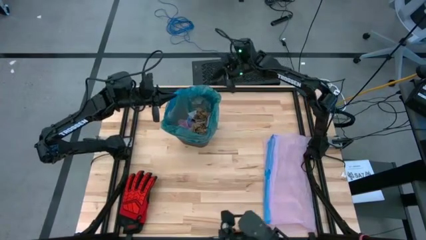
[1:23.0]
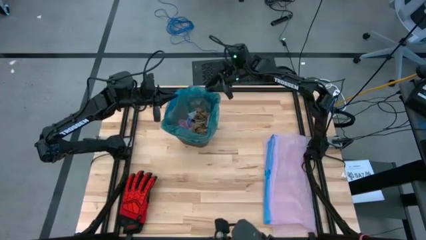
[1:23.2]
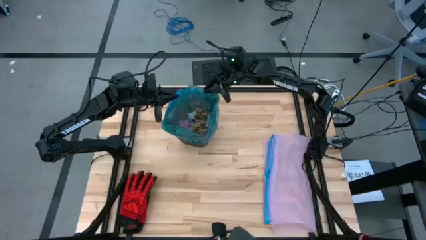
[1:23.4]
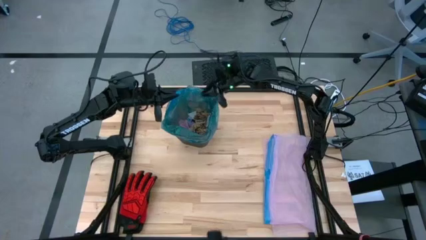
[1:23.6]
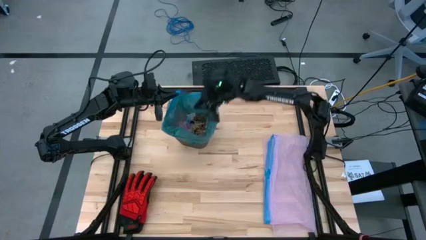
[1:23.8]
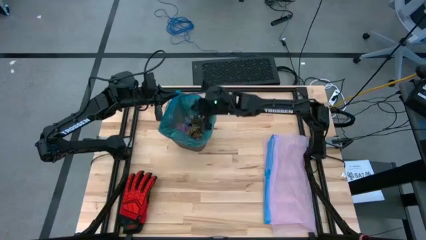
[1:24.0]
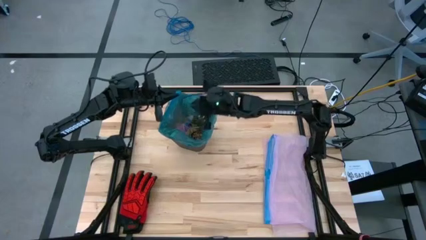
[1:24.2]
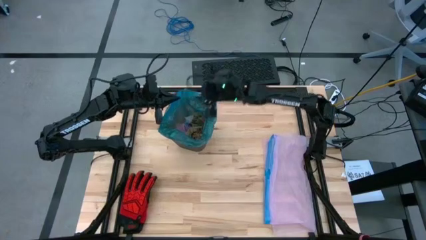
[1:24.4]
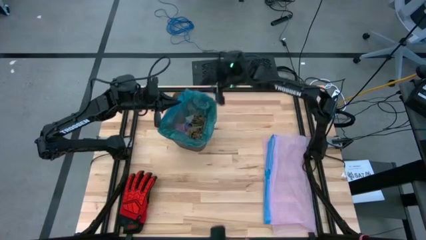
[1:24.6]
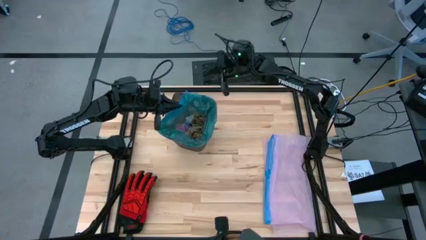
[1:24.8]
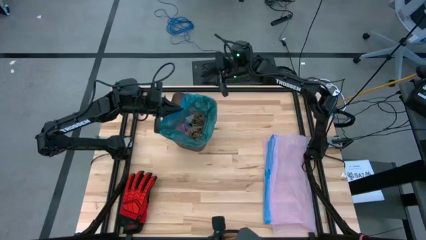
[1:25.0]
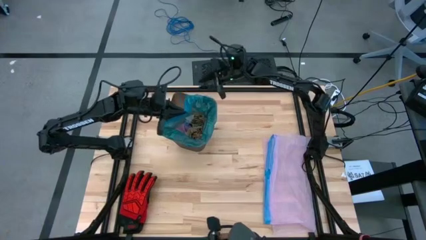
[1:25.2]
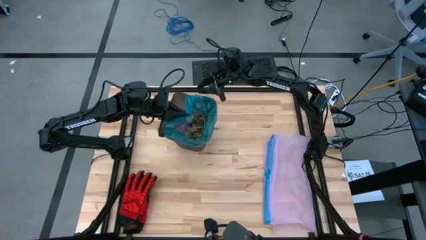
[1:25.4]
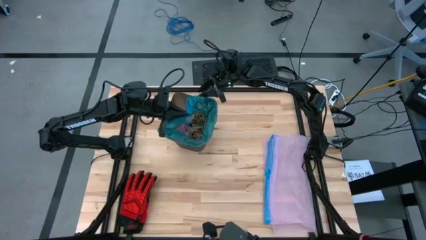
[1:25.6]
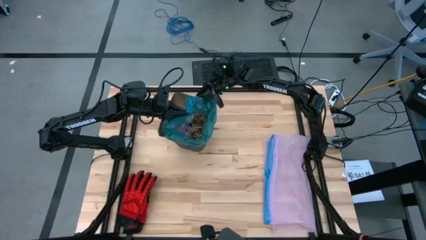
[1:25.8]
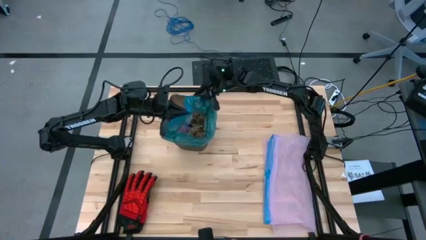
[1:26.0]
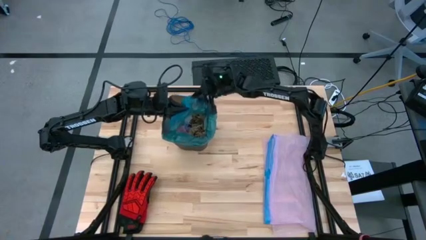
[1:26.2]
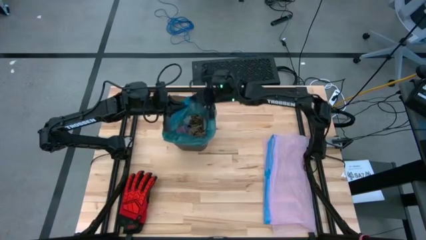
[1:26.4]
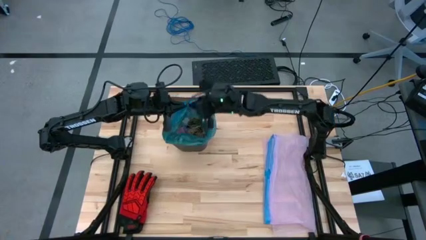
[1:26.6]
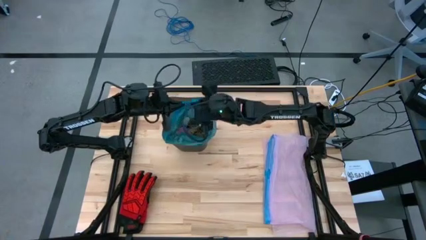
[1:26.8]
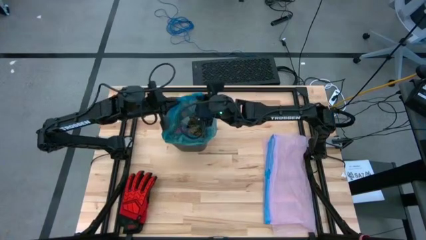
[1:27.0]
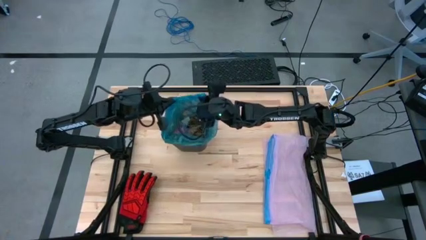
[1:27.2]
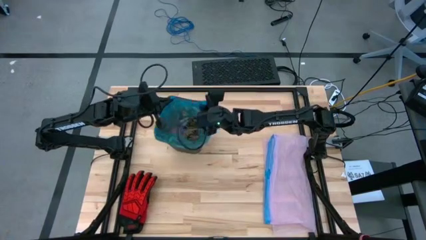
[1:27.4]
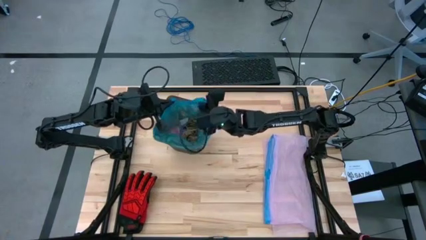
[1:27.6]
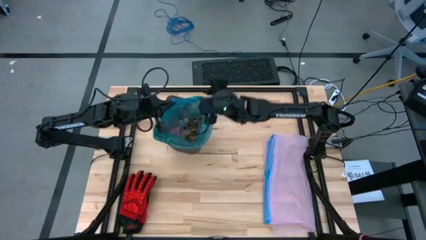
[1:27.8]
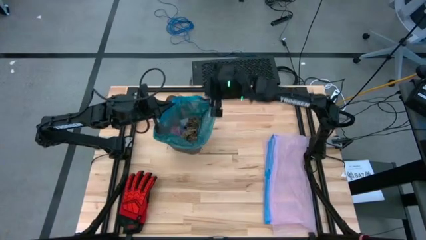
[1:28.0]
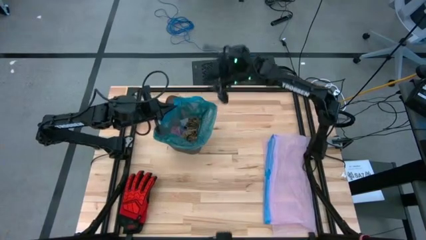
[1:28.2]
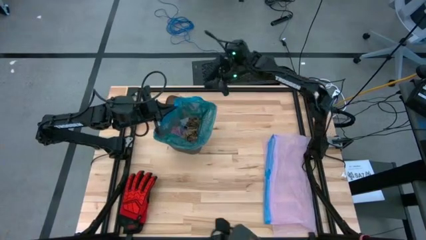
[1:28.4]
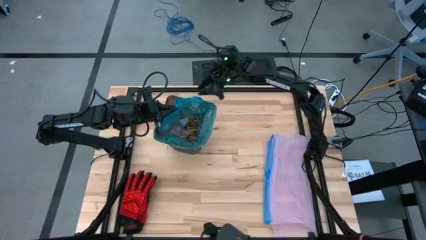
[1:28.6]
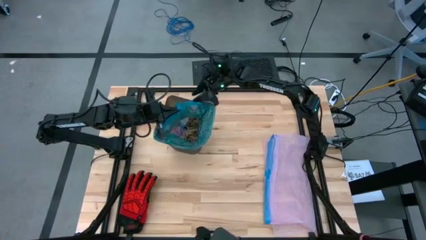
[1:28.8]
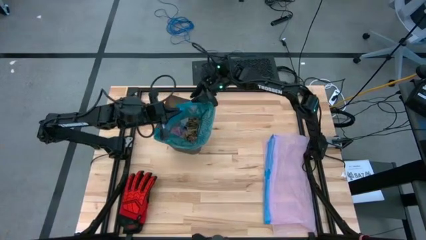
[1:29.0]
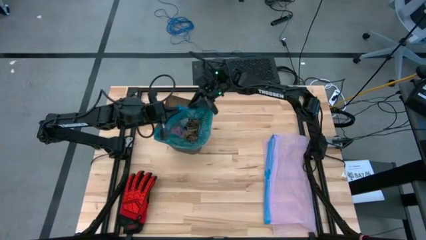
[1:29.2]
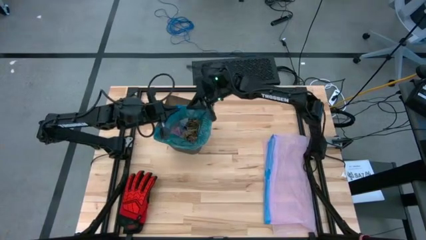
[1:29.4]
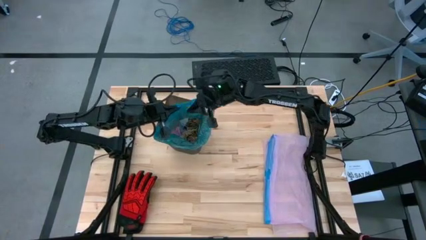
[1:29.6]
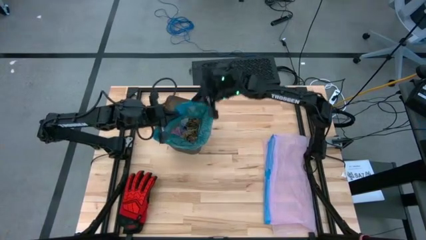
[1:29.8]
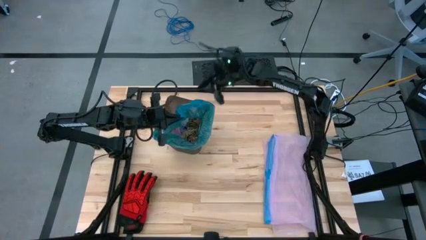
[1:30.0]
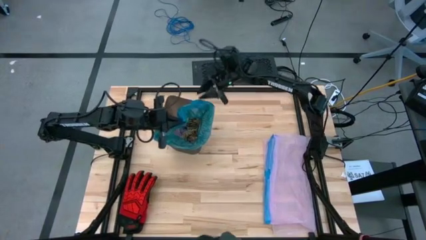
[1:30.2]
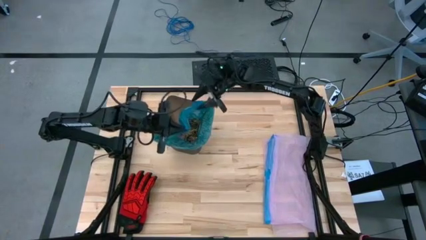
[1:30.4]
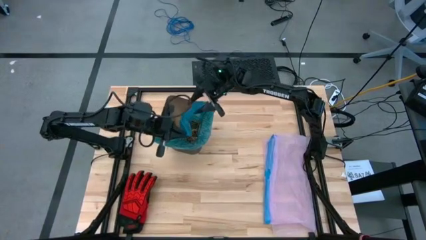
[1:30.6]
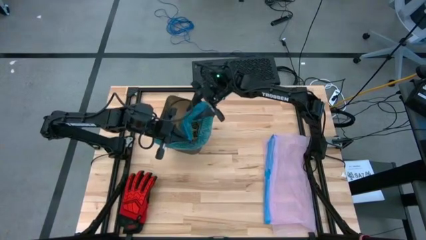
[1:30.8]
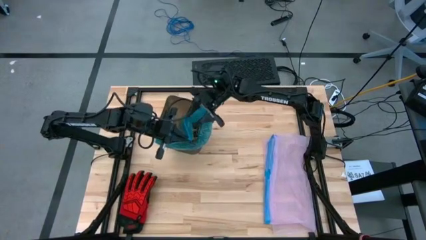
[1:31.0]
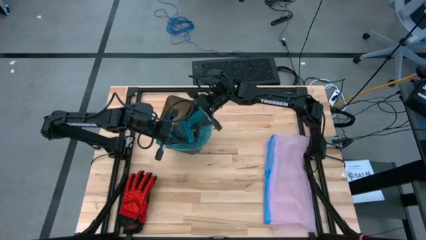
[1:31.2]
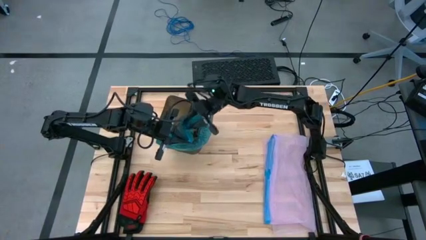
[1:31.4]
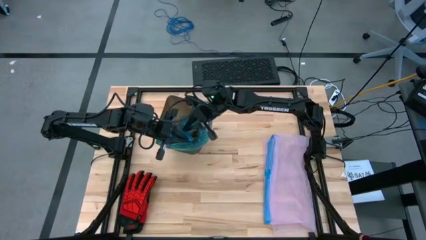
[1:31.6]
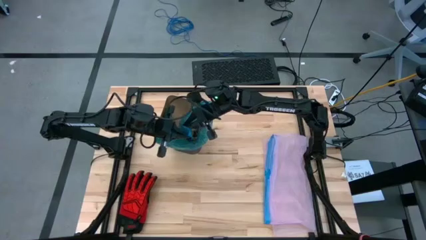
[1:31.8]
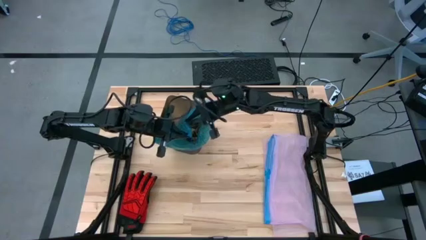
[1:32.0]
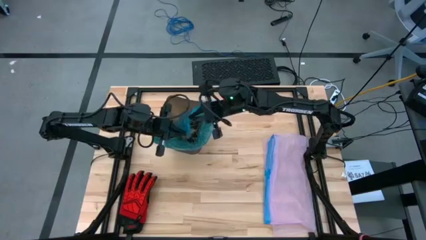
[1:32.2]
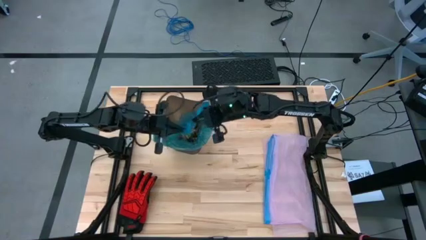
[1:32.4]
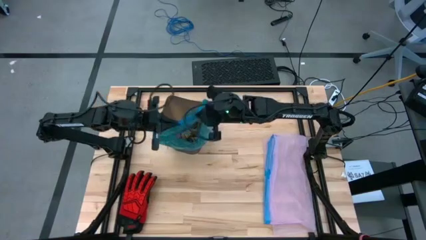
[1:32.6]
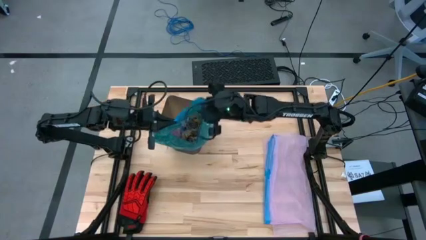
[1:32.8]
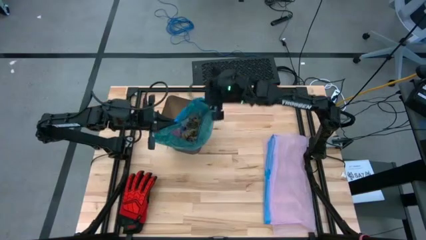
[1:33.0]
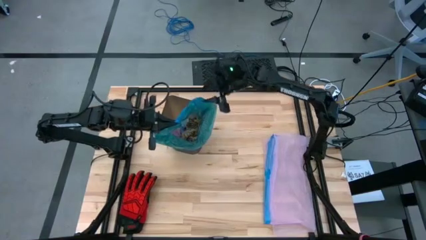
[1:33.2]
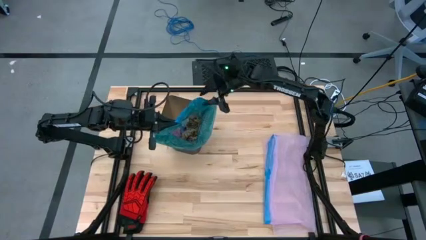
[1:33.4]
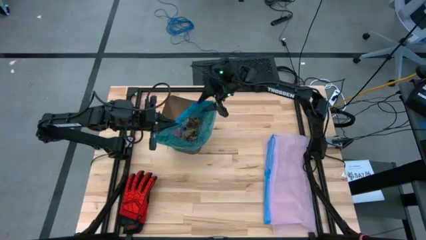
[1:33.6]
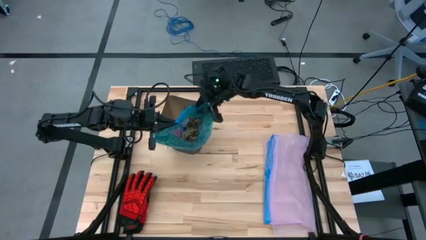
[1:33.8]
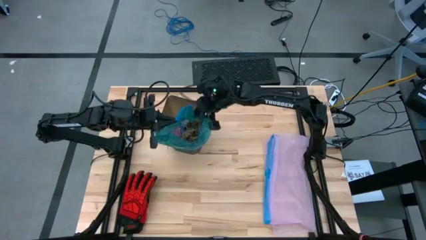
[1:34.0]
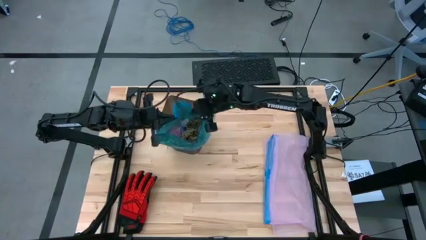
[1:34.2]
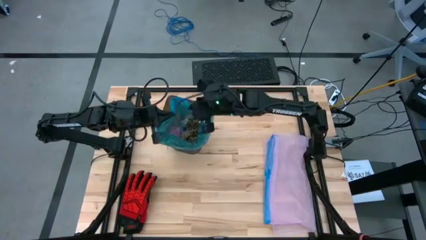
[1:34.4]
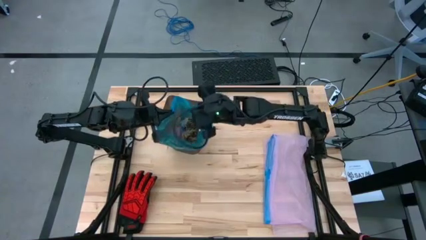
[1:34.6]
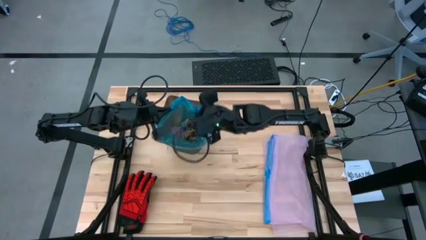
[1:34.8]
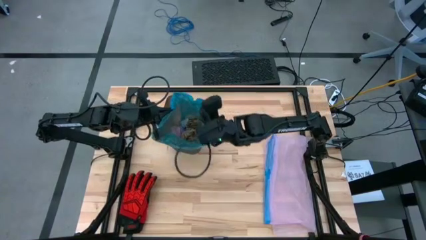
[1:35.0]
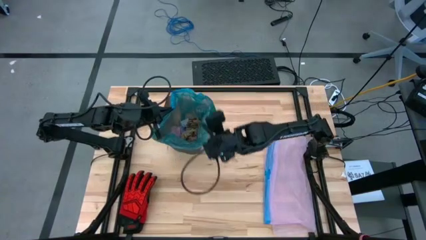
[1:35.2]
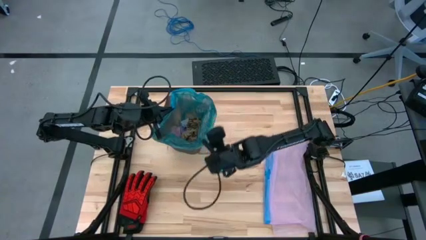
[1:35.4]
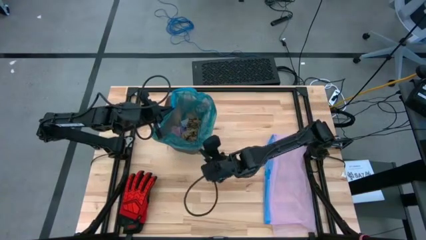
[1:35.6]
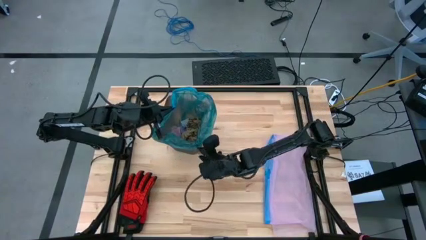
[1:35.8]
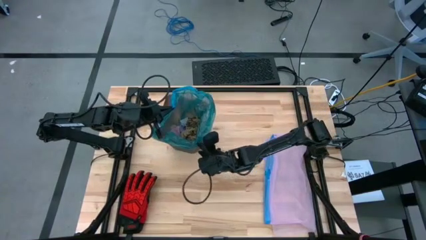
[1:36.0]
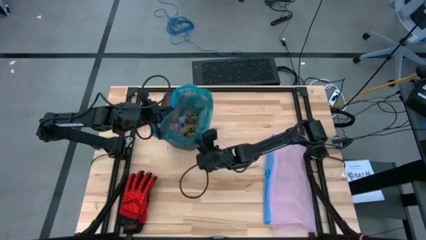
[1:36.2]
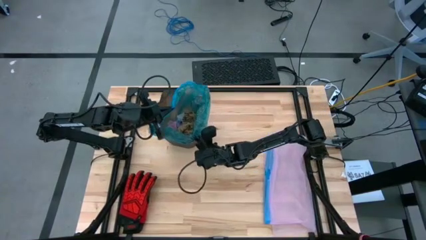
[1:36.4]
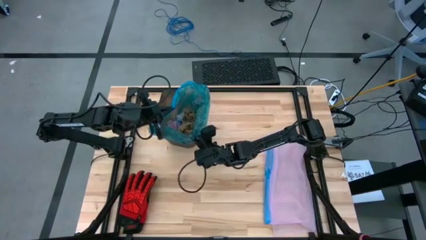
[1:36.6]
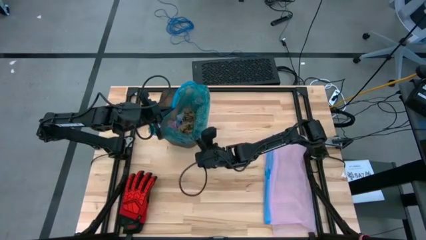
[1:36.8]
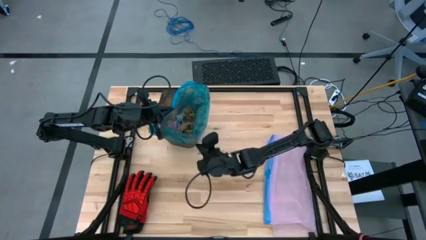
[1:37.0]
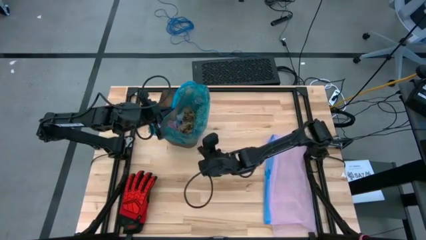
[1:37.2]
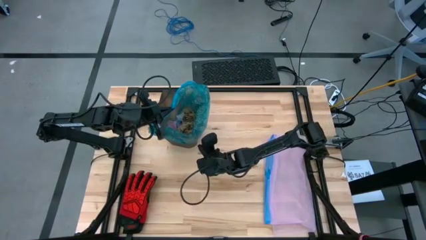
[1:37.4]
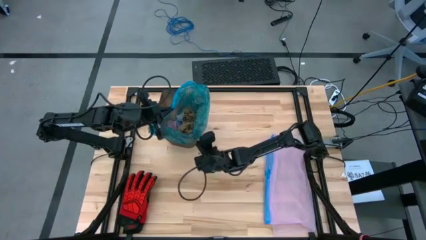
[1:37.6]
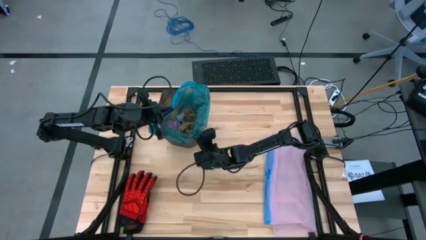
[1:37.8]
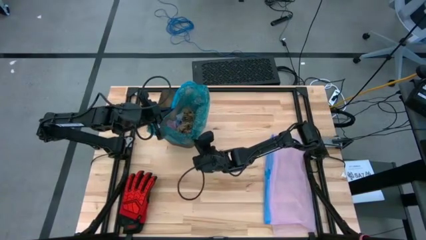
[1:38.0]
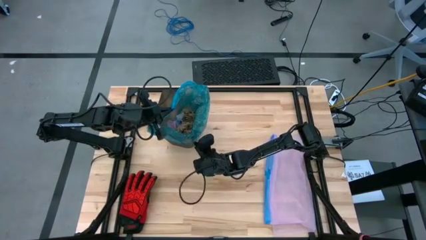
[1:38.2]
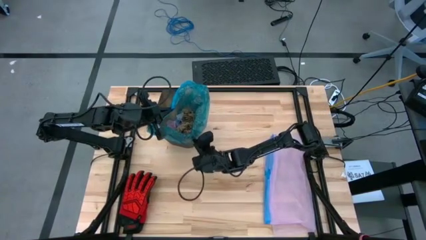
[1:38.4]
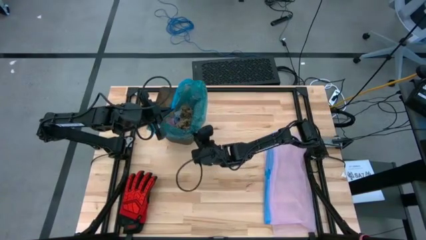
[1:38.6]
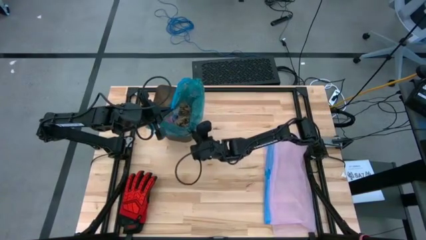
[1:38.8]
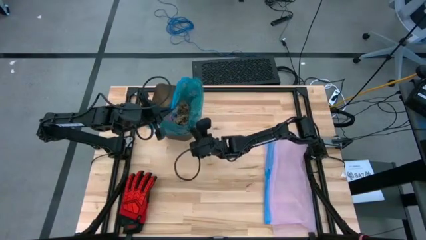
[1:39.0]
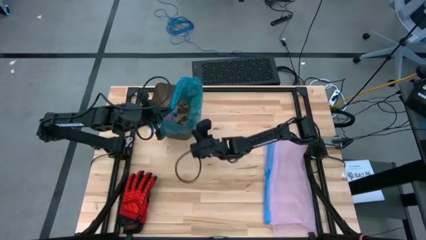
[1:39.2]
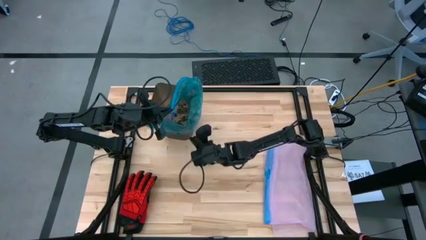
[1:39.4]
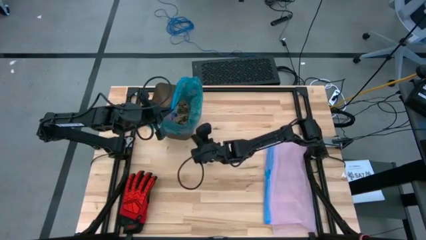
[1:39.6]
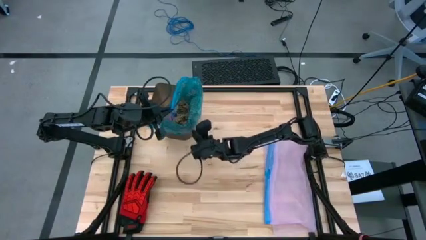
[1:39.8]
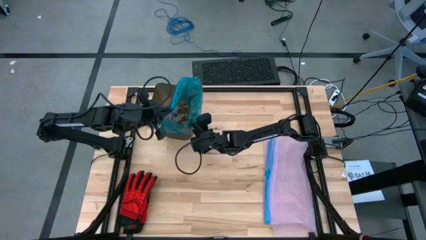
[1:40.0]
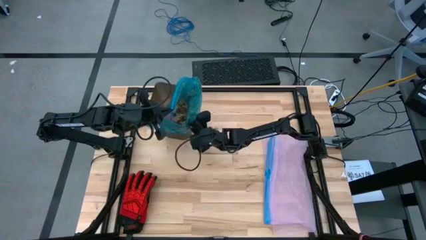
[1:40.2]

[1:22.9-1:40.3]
Task: place trash/remove bag and relplace
Remove the blue trash bag from the trash bin
